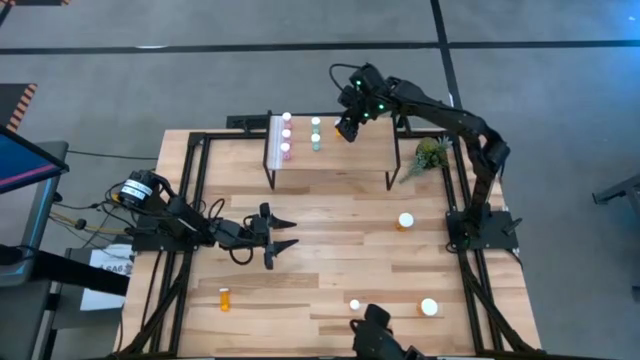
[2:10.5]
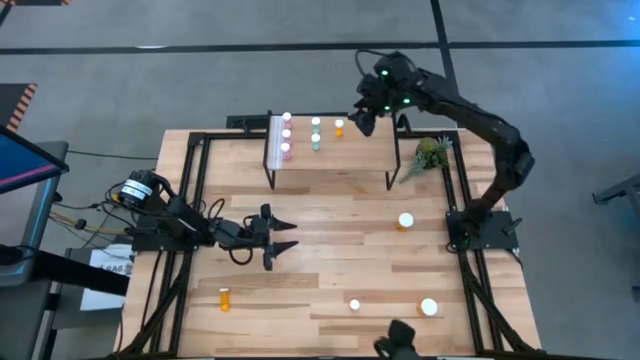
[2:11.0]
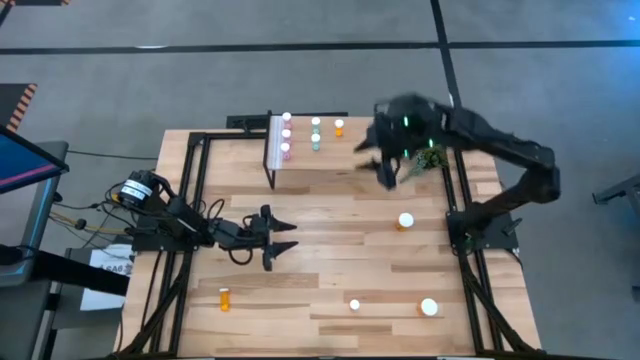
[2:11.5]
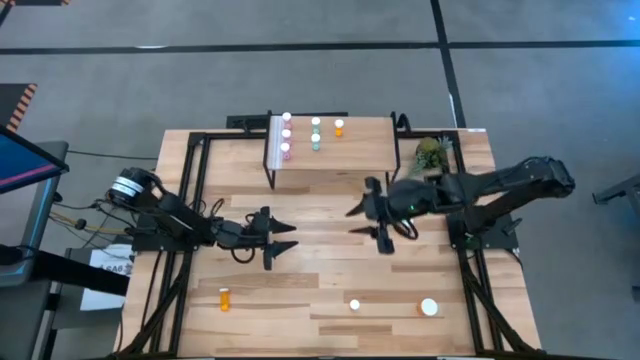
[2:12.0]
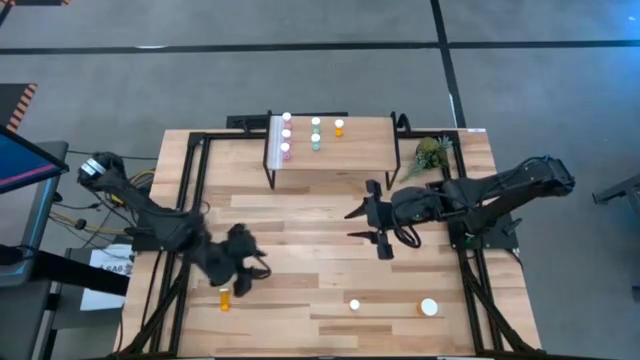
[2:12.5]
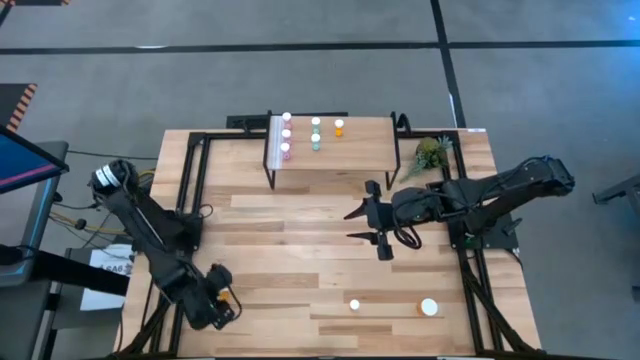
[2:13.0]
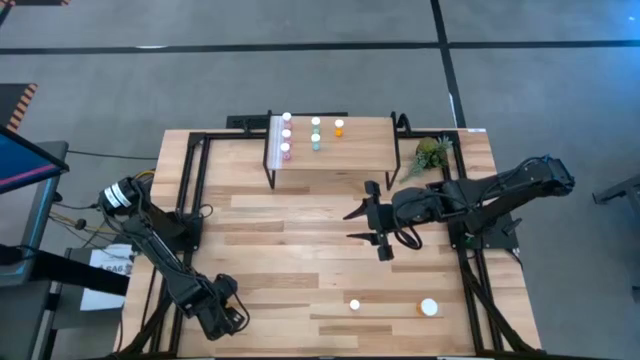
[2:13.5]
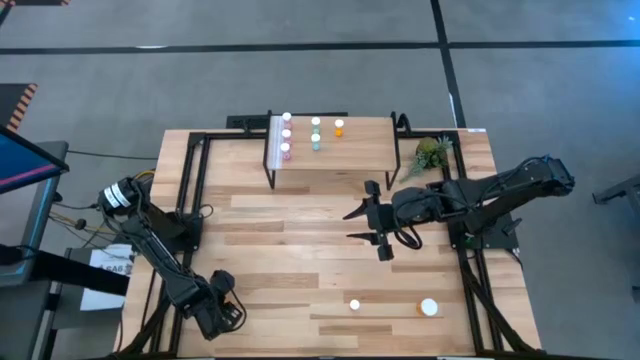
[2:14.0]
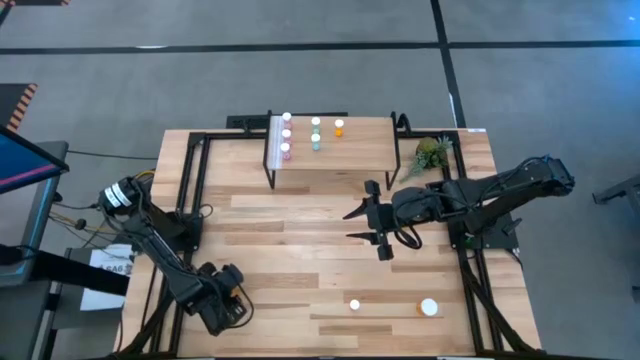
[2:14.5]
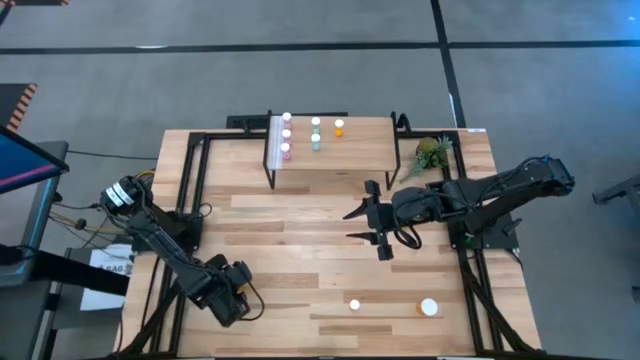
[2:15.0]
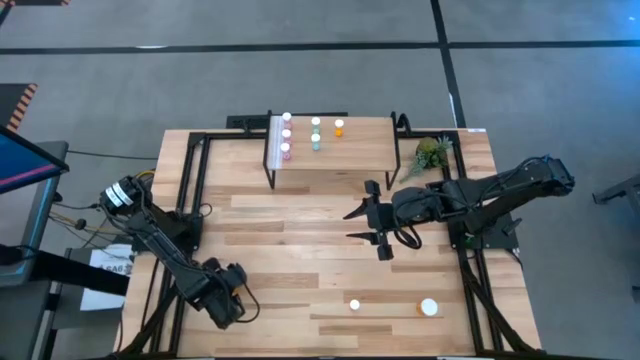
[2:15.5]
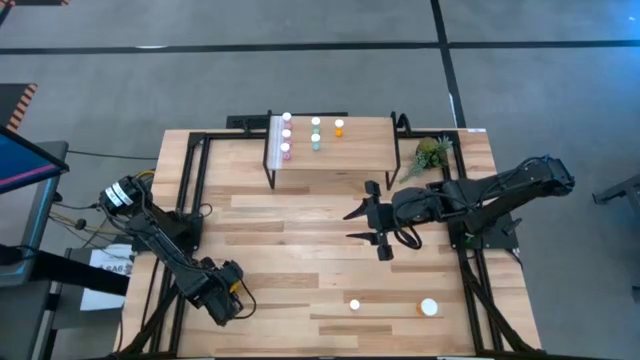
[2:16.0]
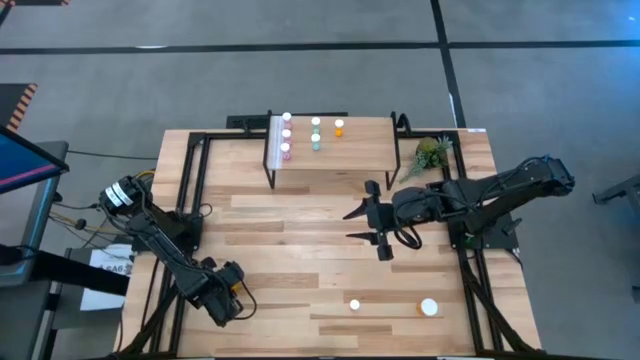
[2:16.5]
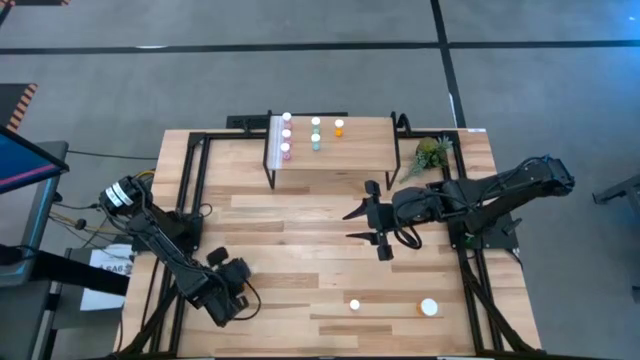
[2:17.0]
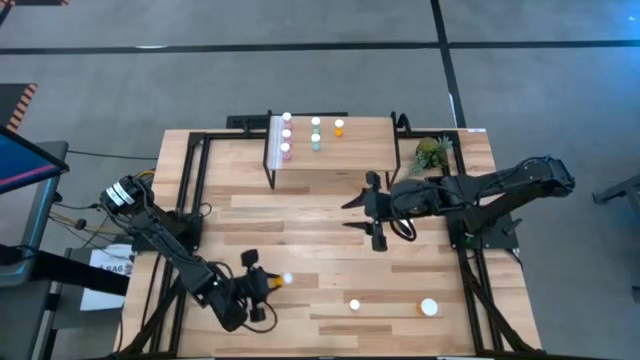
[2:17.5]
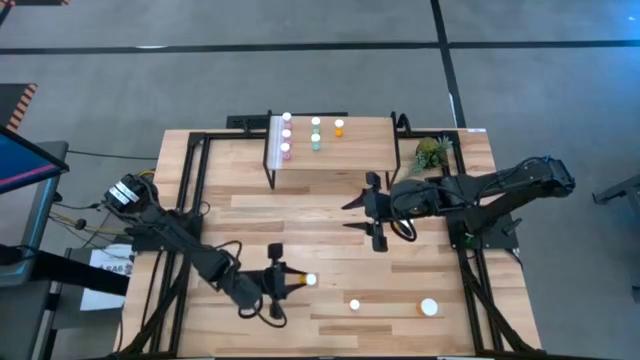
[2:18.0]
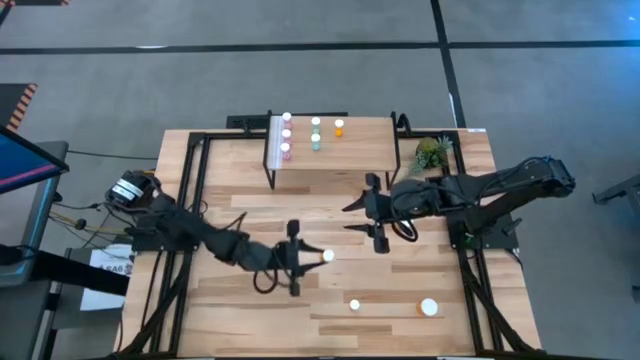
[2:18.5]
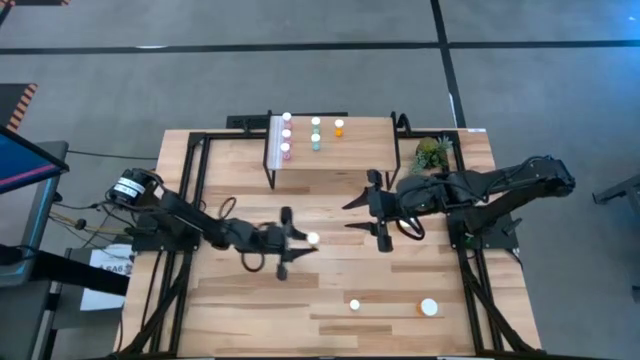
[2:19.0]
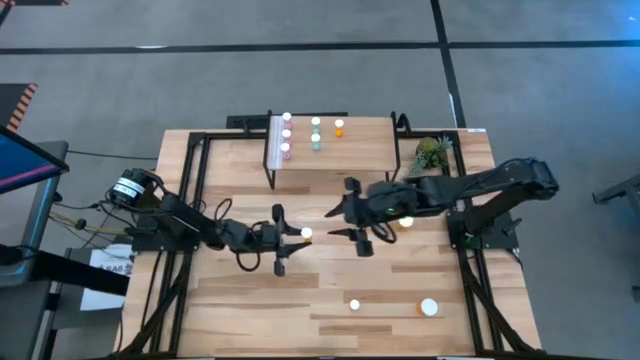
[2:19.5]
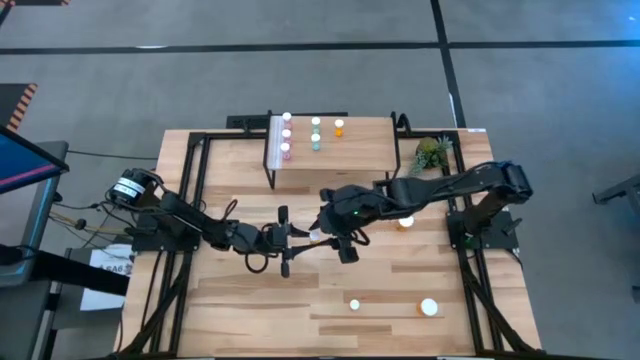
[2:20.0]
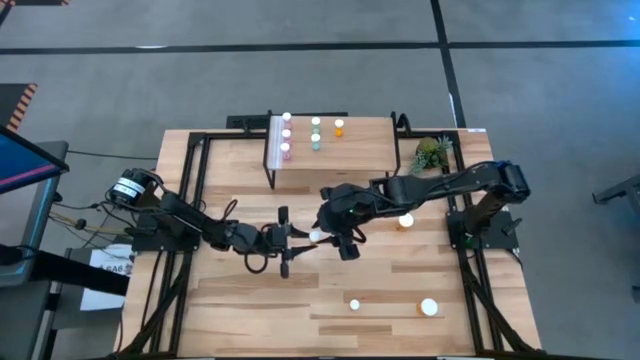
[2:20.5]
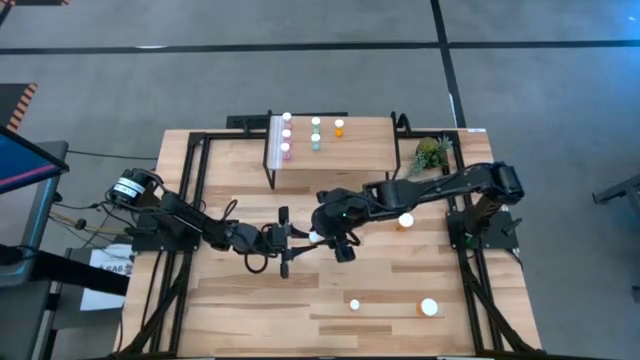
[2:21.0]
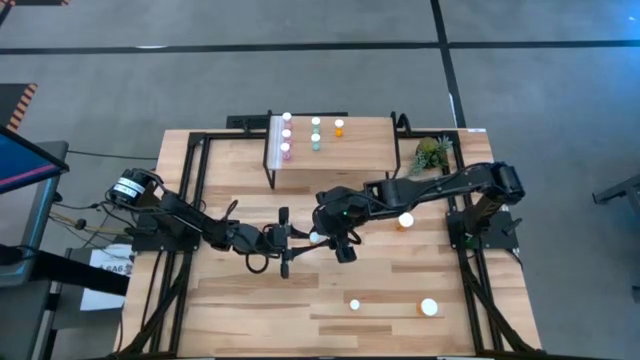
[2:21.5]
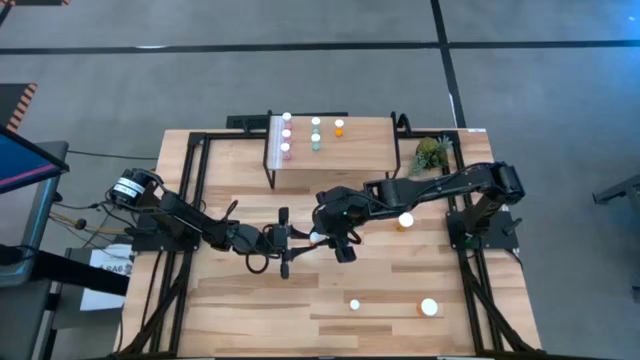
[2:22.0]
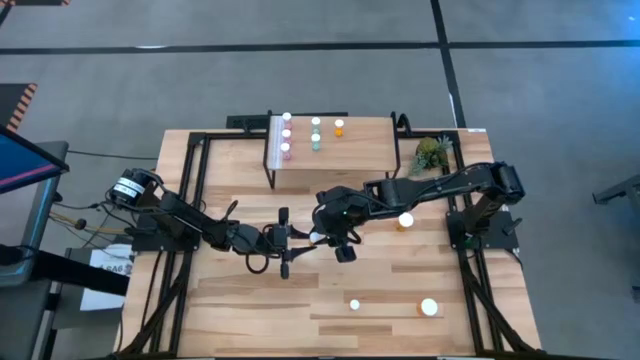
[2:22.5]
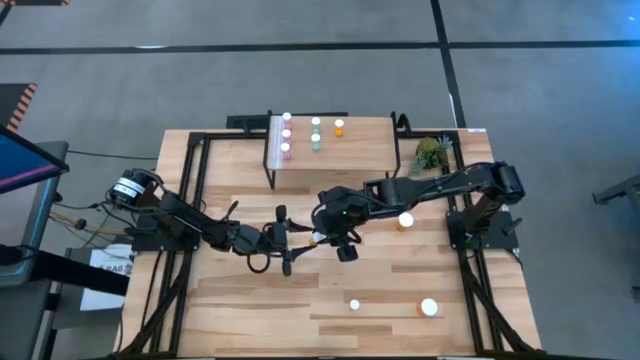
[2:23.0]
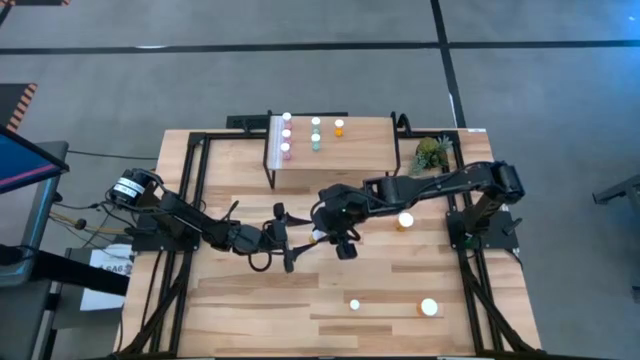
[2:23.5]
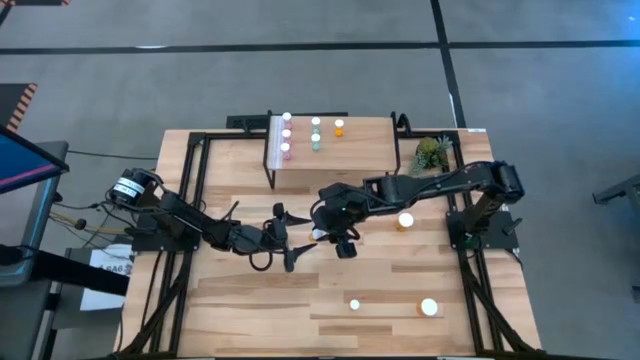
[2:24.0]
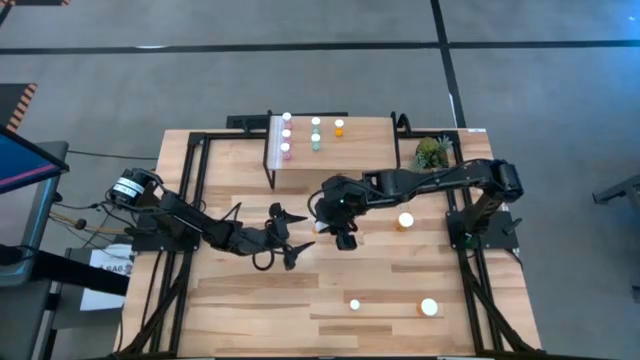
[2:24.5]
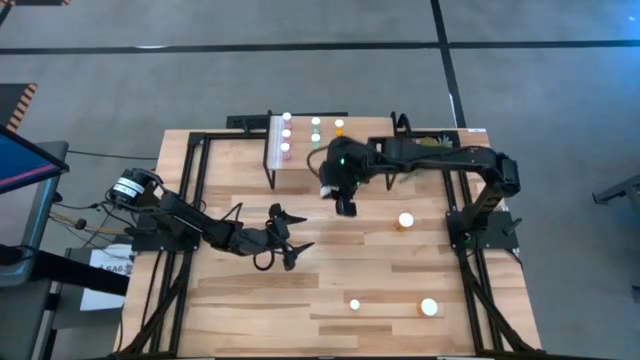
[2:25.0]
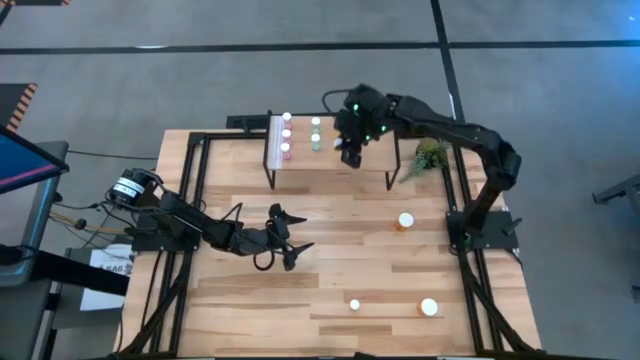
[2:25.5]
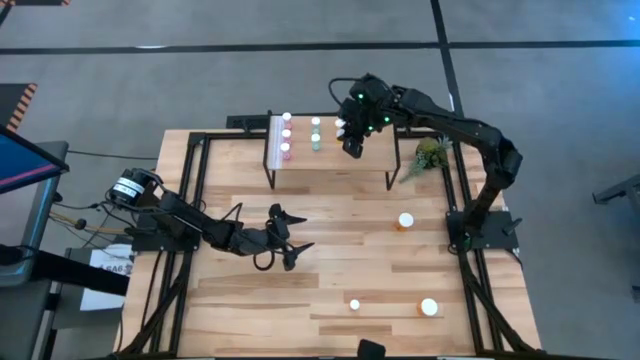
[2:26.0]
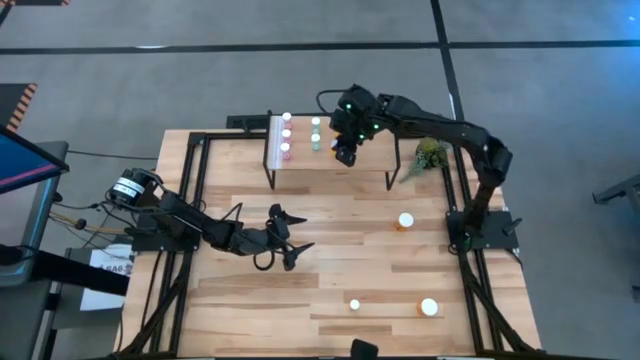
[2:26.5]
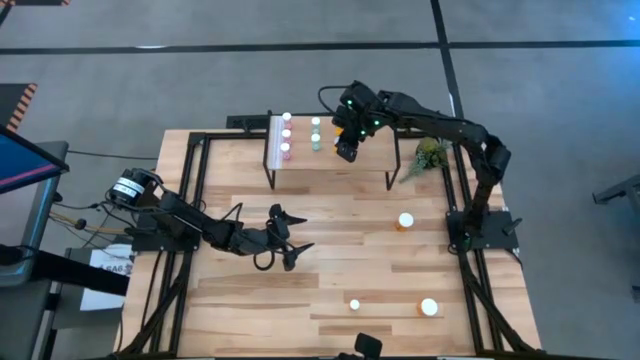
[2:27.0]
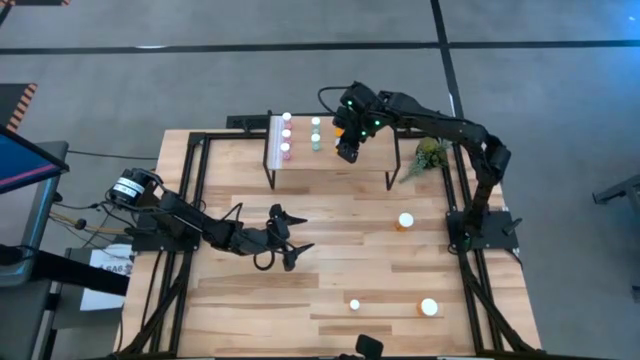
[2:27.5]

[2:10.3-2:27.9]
Task: Pick and place medicine bottles onto shelf by color
Put the left small orange pill bottle on the shelf aligned with the other small orange pill bottle

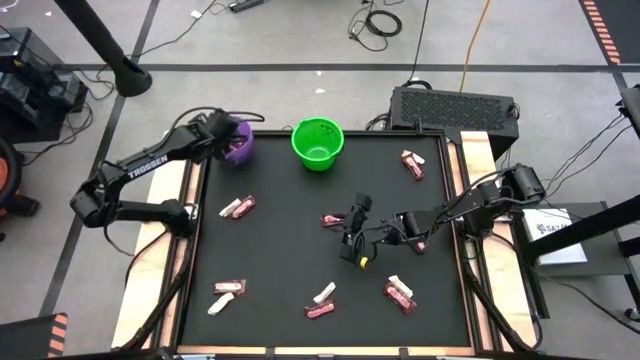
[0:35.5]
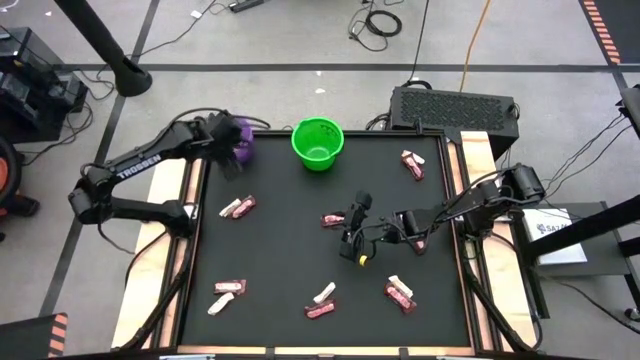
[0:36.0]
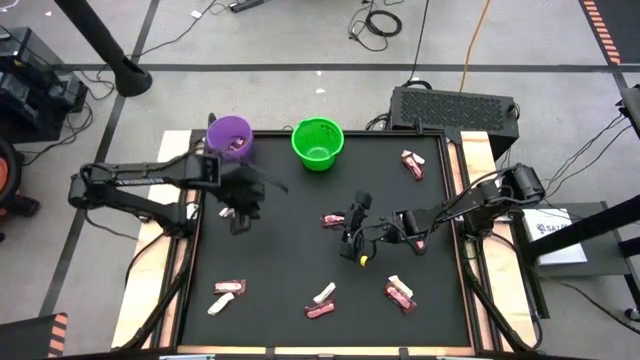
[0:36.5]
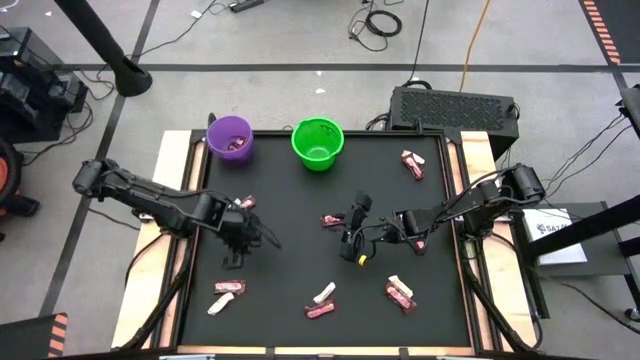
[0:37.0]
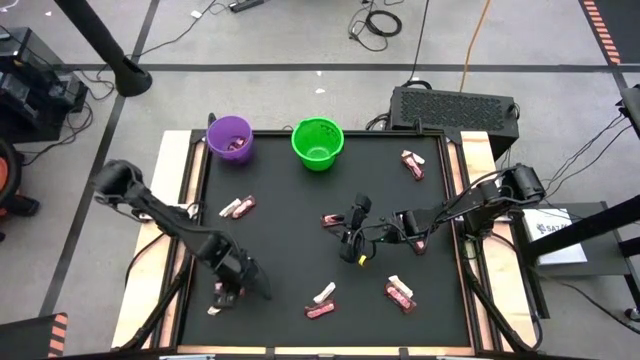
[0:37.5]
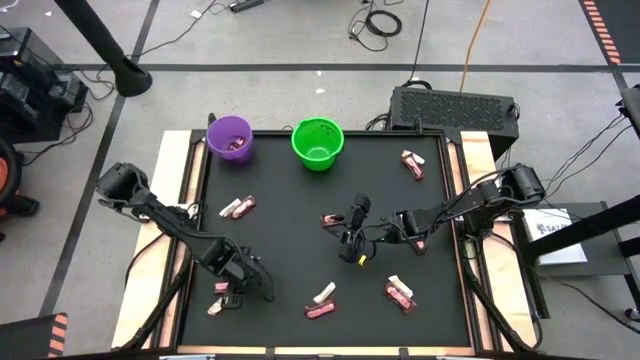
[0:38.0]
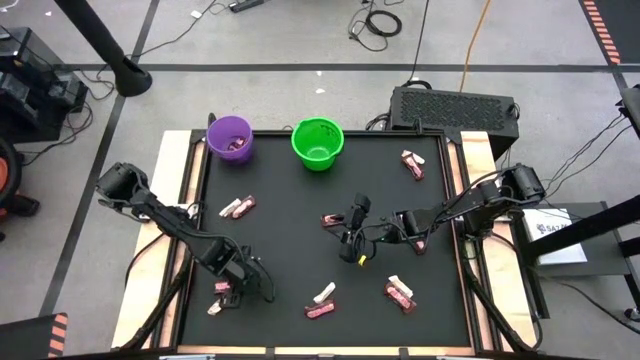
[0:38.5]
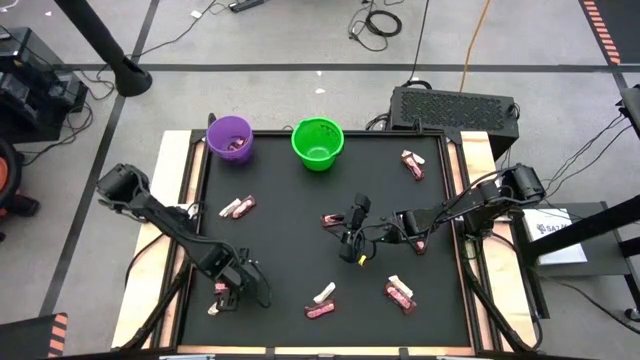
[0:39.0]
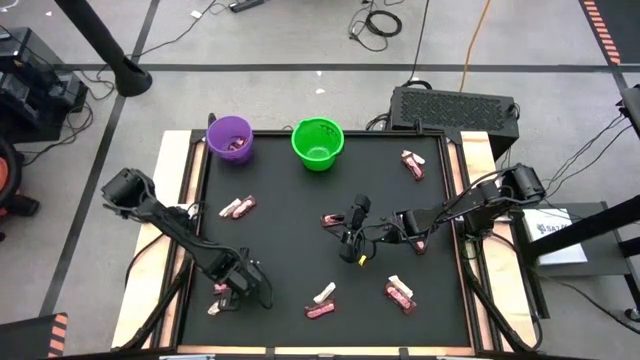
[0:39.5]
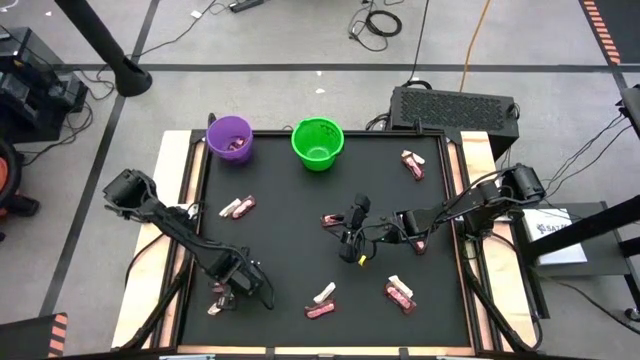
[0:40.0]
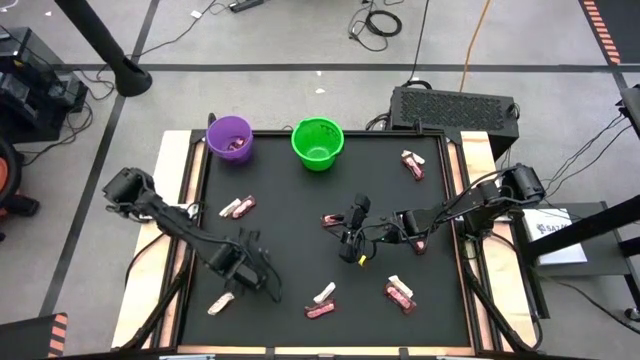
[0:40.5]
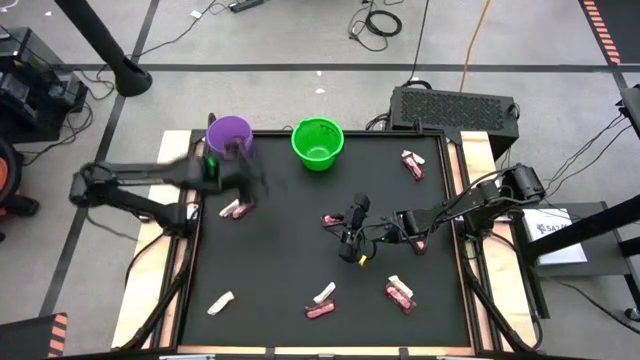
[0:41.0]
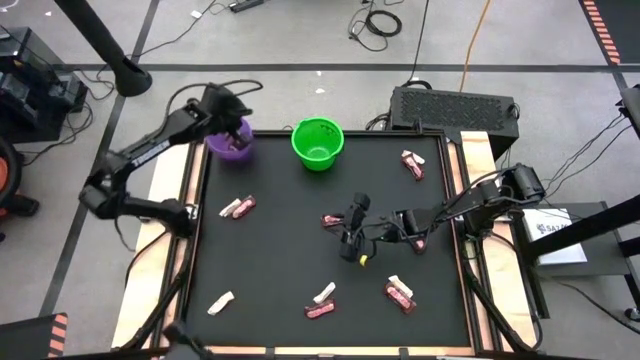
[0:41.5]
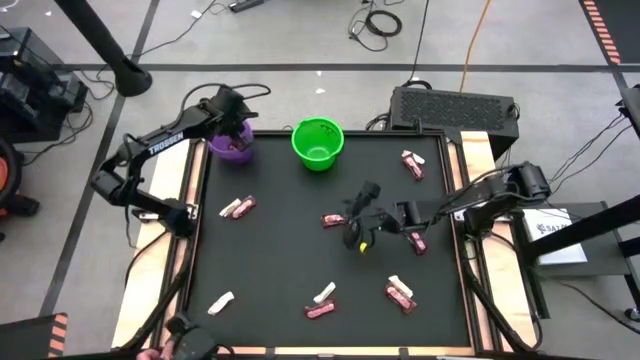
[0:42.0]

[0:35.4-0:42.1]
Task: Sort candy by brand, put in halloween buckets
Put the brown chocolate bar into the purple bucket
